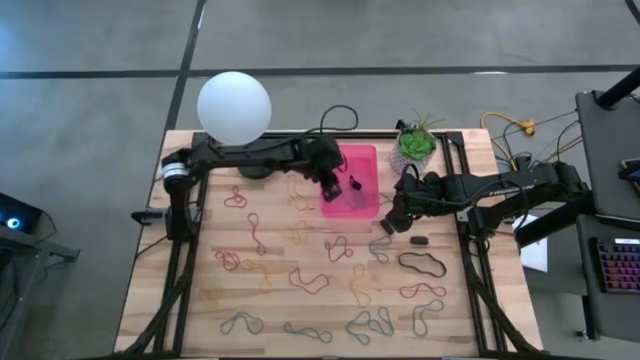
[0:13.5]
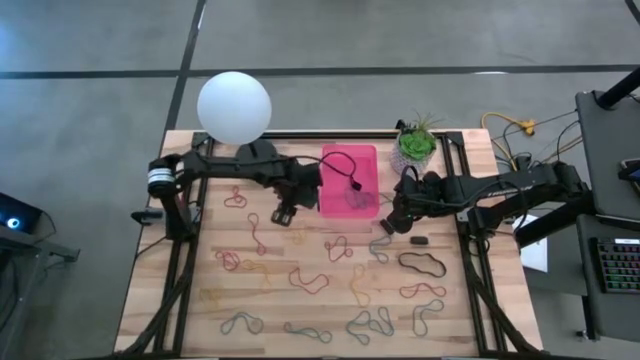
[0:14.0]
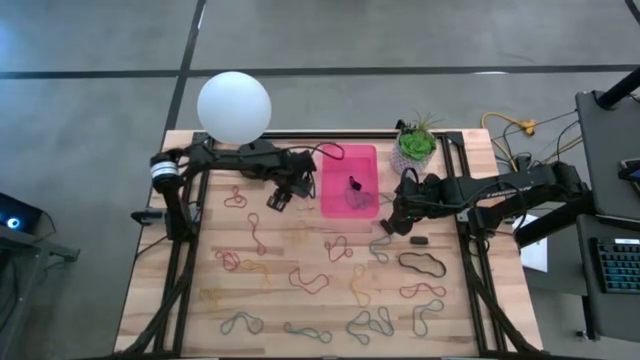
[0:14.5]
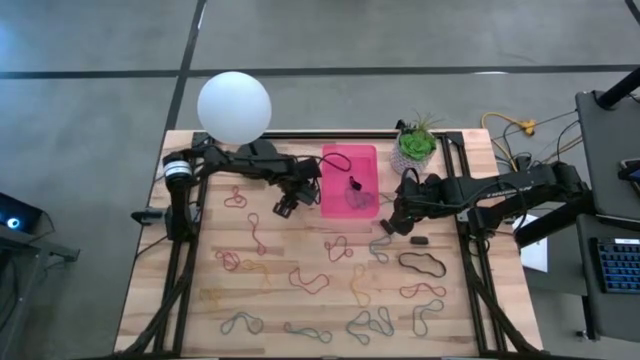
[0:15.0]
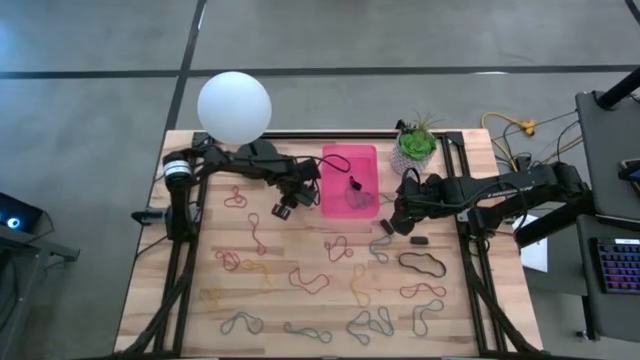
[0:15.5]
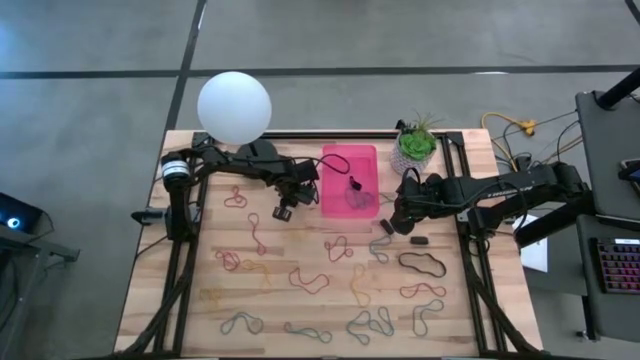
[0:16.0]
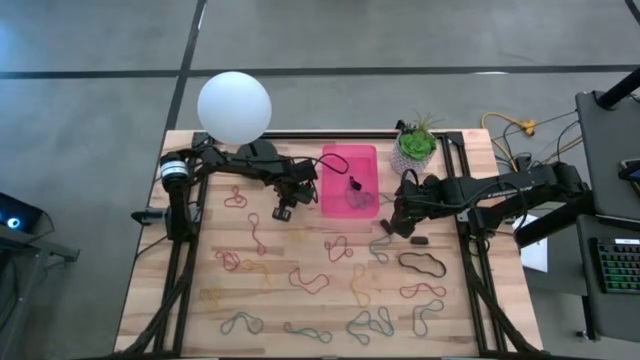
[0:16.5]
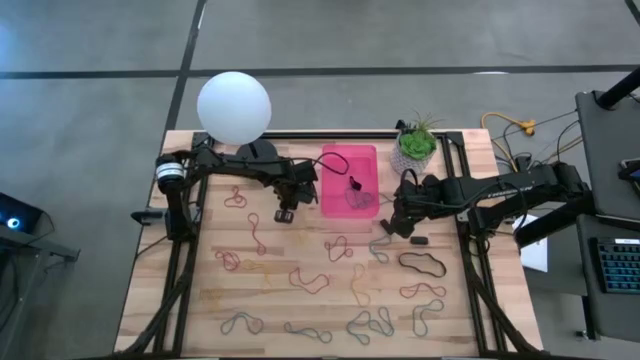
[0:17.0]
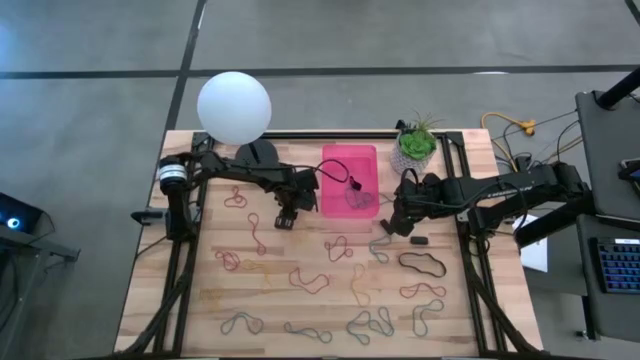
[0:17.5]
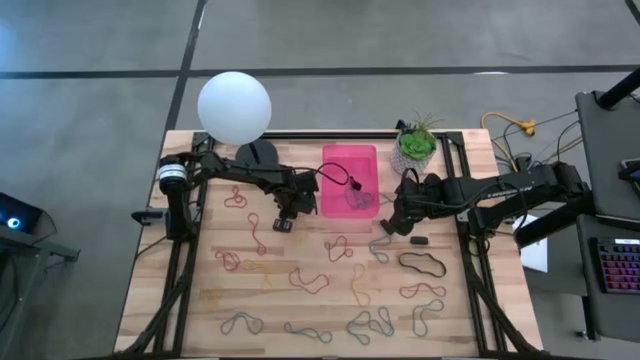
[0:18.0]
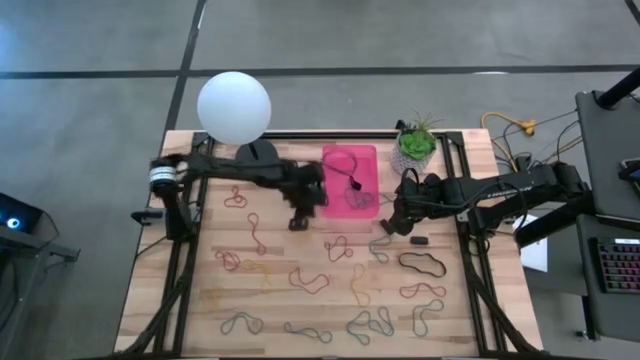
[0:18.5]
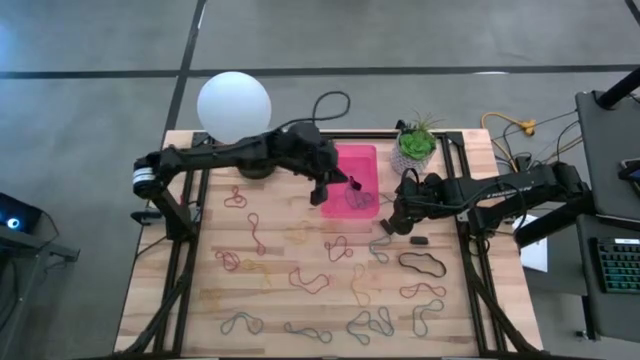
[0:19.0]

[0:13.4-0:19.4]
Task: Pick and place rubber bands into bin
Put the yellow rubber band into the pink bin

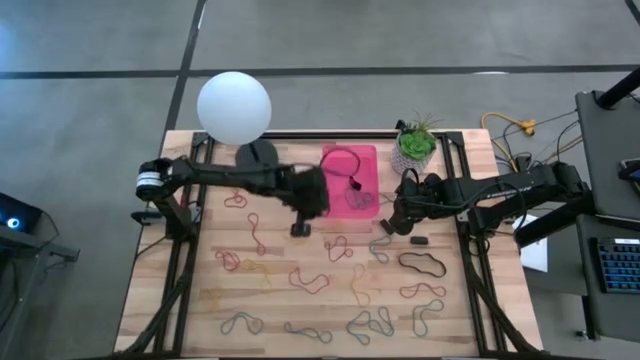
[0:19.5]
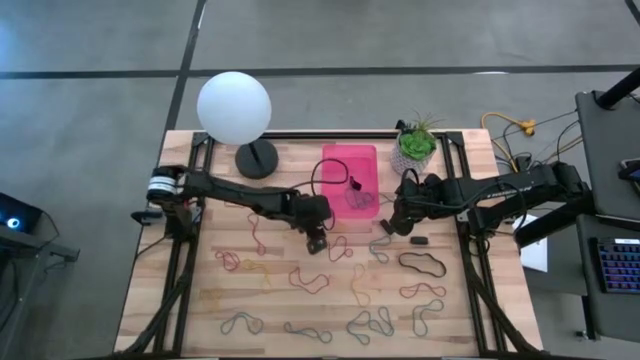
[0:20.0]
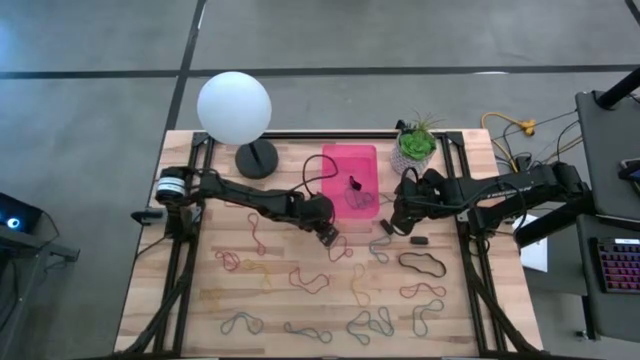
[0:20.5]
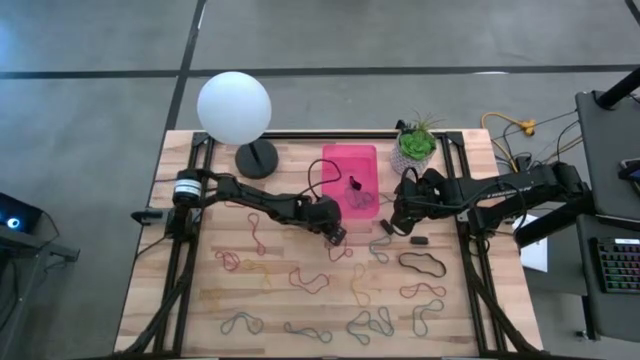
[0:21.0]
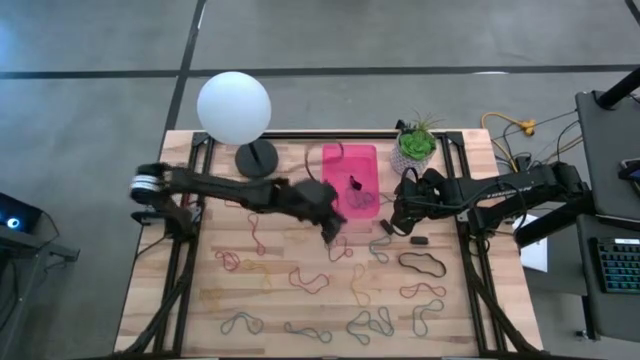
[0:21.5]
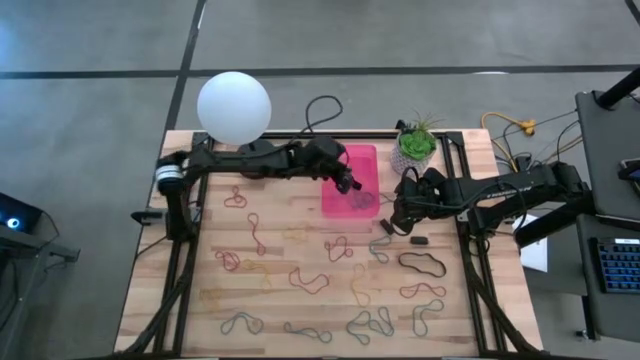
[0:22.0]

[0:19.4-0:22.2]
Put the yellow rubber band into the pink bin

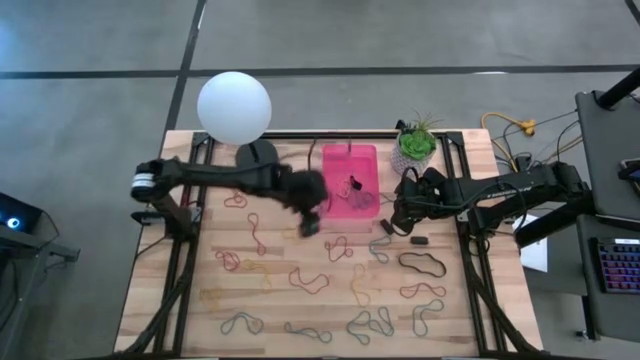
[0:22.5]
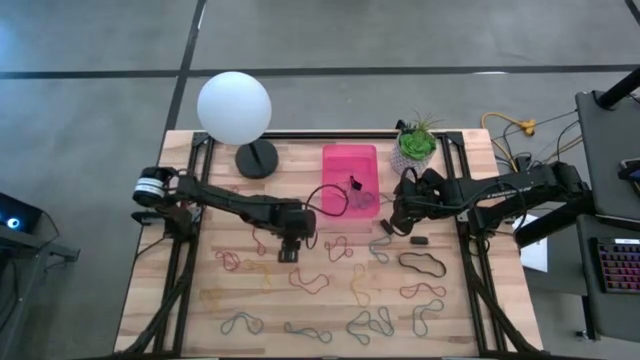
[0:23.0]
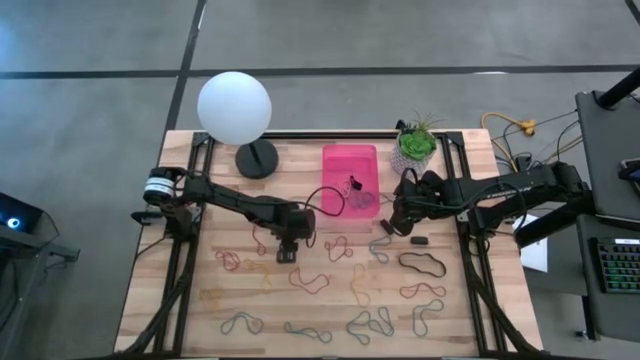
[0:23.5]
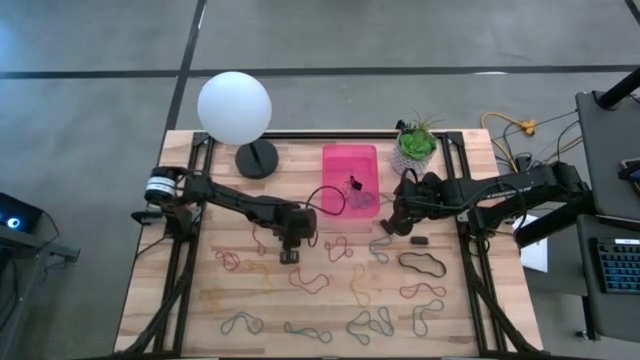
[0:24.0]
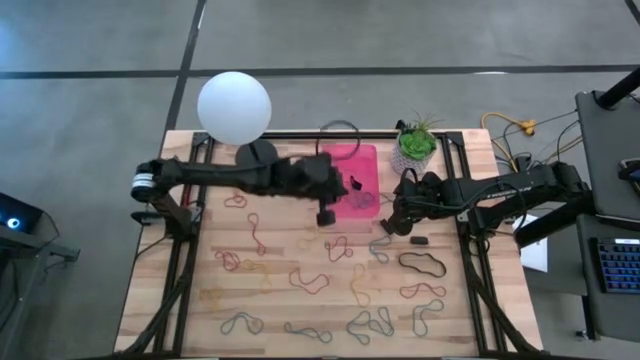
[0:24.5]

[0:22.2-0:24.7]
Put the yellow rubber band into the pink bin

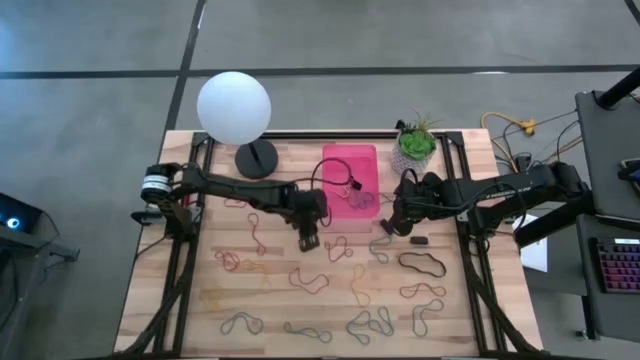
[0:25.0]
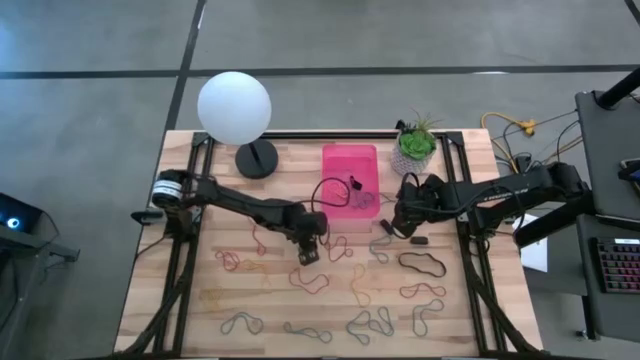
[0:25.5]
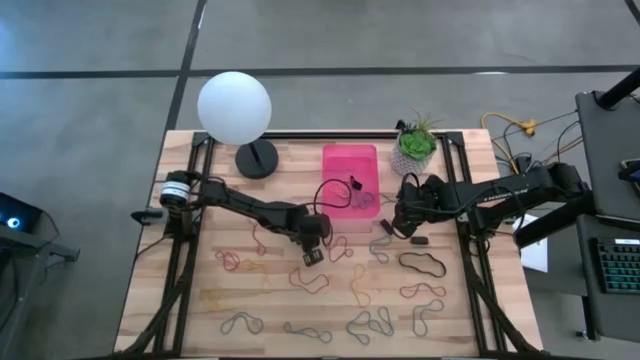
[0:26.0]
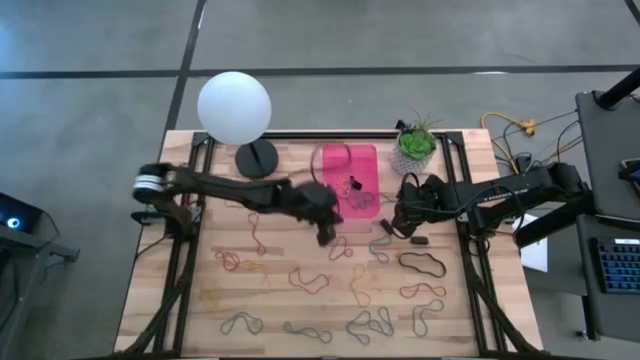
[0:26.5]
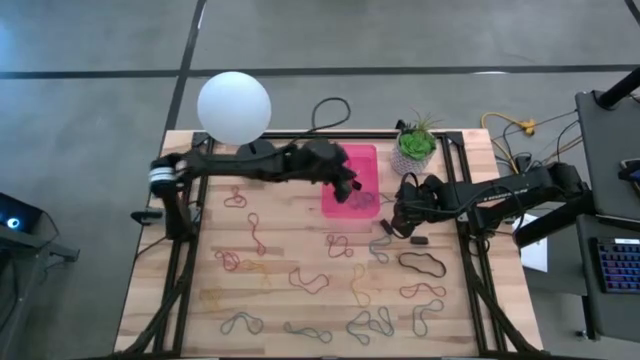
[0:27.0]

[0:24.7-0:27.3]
Put the yellow rubber band into the pink bin

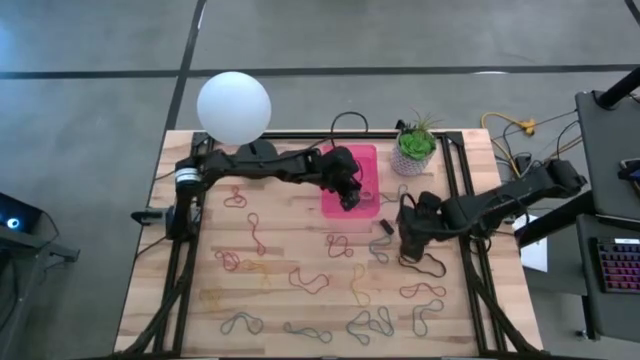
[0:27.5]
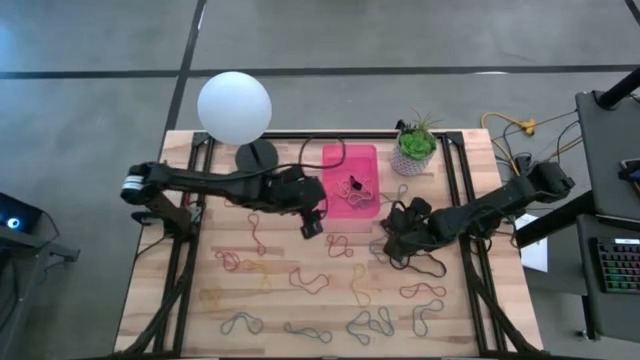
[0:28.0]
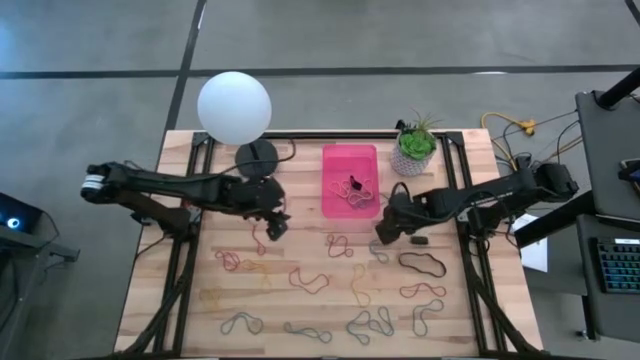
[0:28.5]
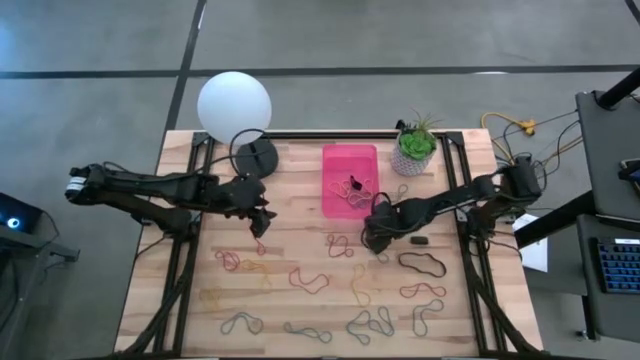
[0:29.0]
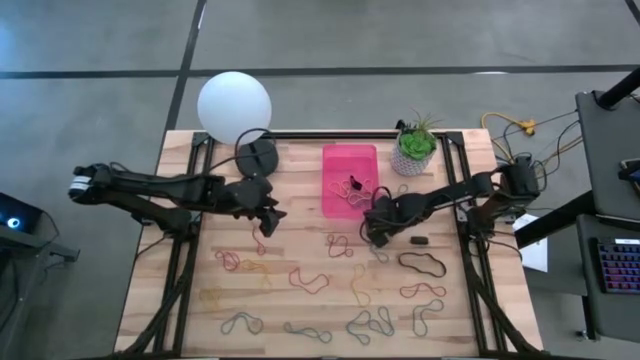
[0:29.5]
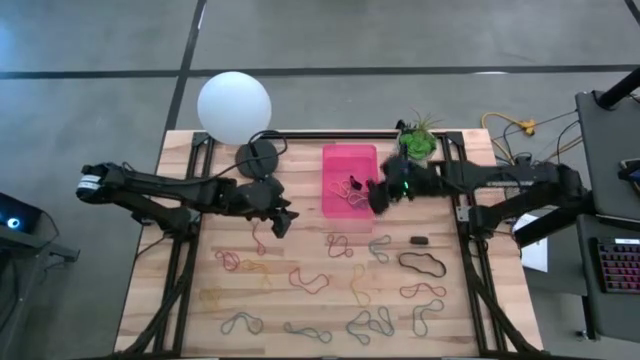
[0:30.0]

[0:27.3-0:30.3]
Put the black rubber band into the pink bin

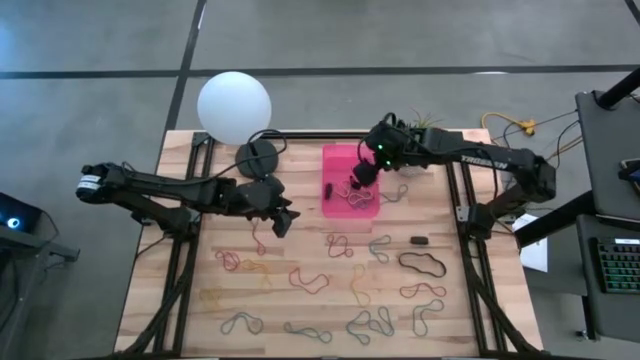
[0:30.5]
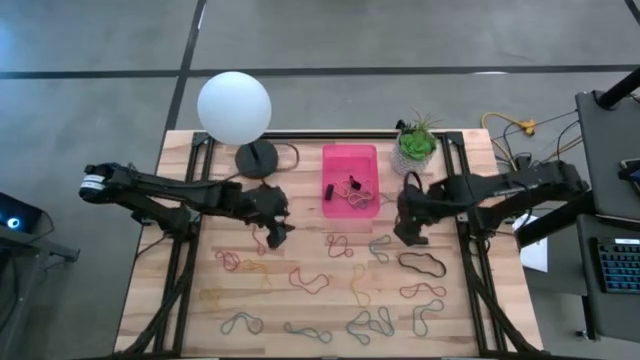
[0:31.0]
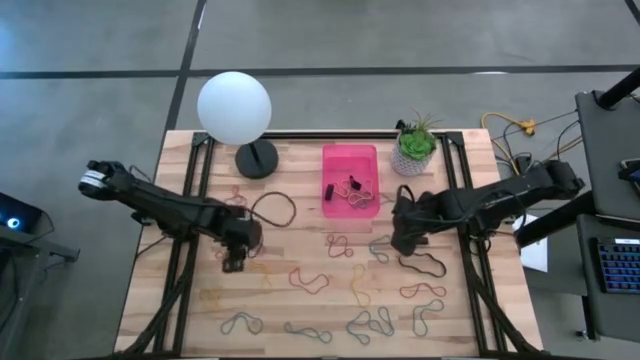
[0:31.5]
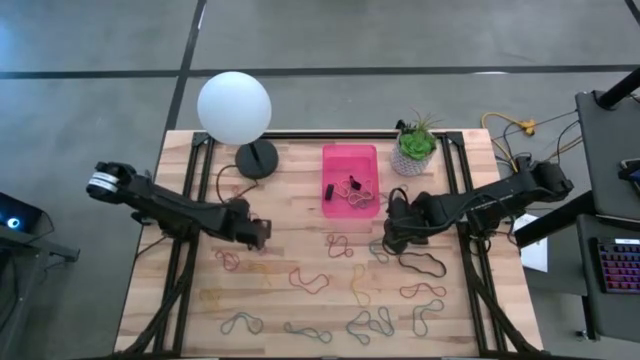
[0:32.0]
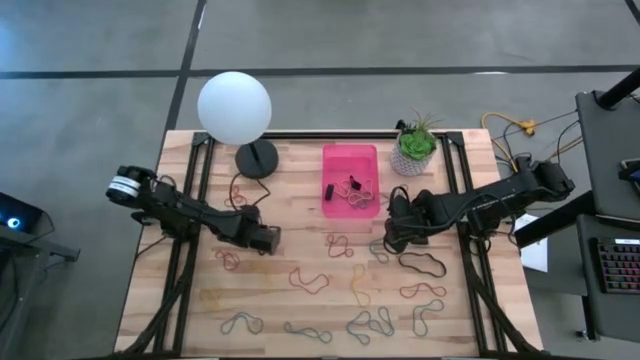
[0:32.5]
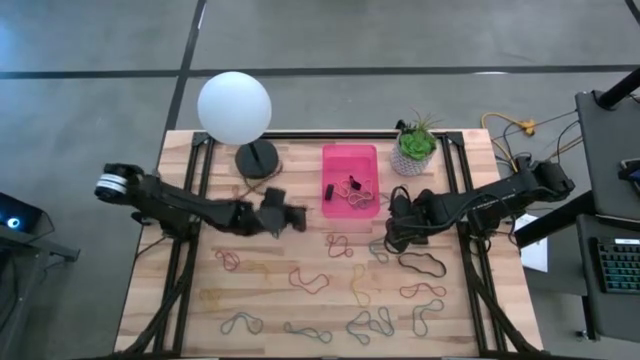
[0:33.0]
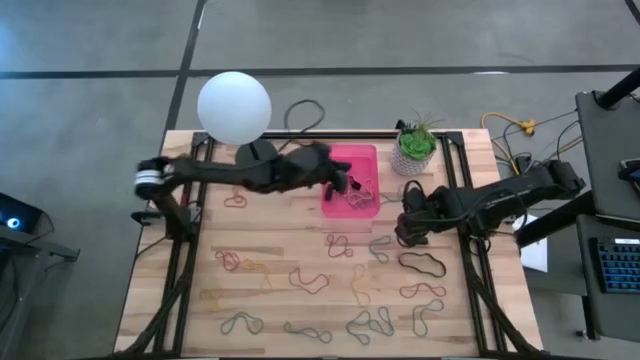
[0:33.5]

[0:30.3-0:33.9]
Put the red rubber band into the pink bin

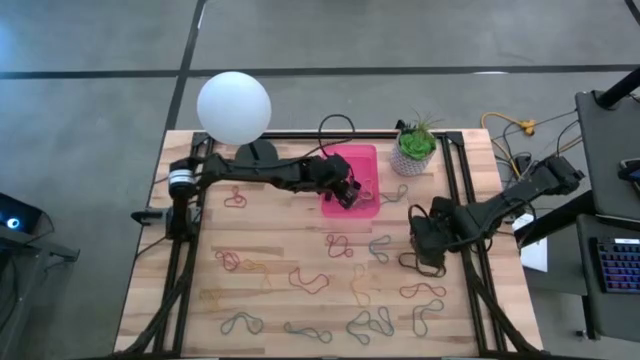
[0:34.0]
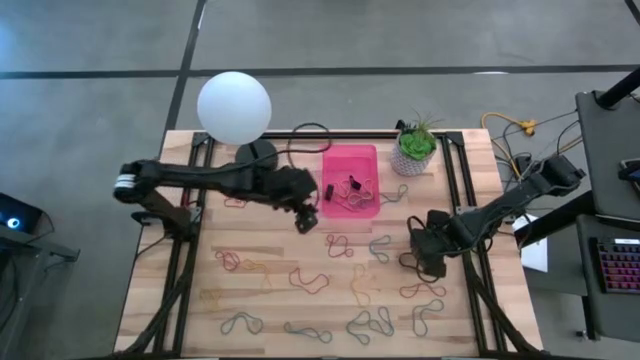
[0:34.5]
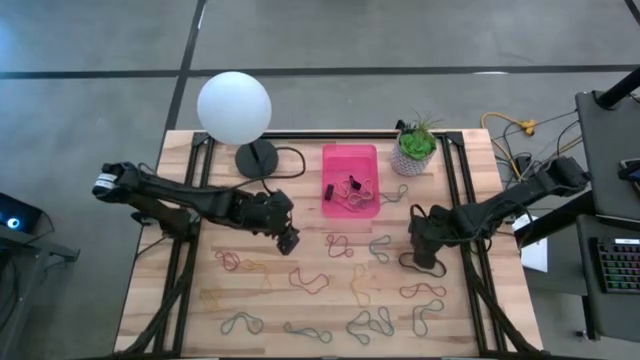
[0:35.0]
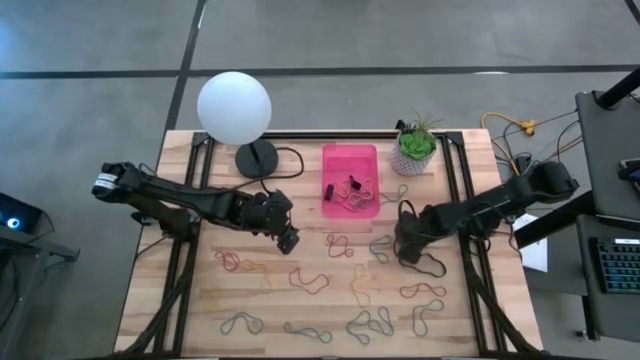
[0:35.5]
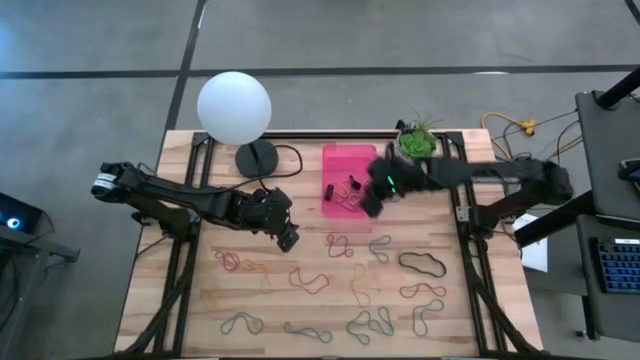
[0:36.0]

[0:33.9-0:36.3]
Put the black rubber band into the pink bin
